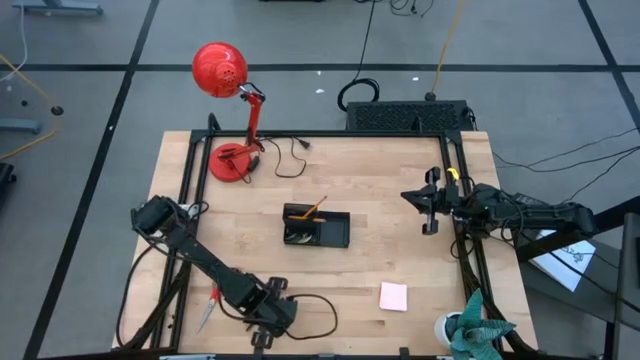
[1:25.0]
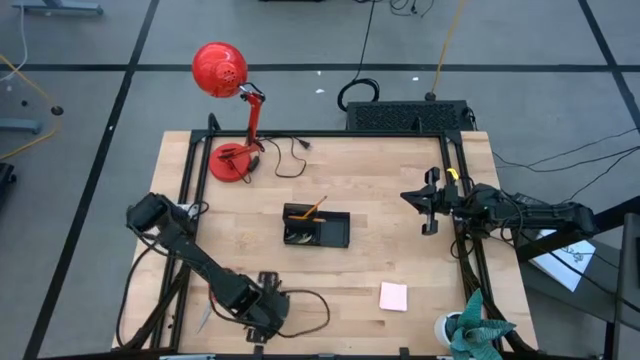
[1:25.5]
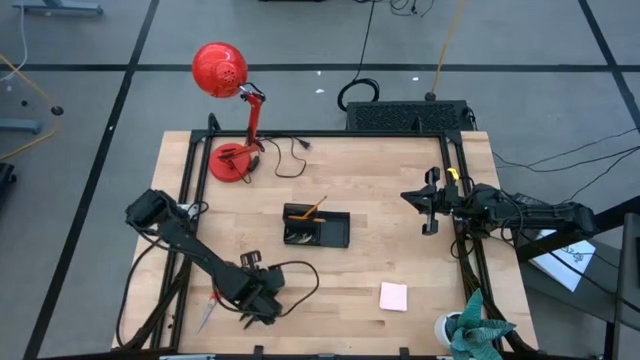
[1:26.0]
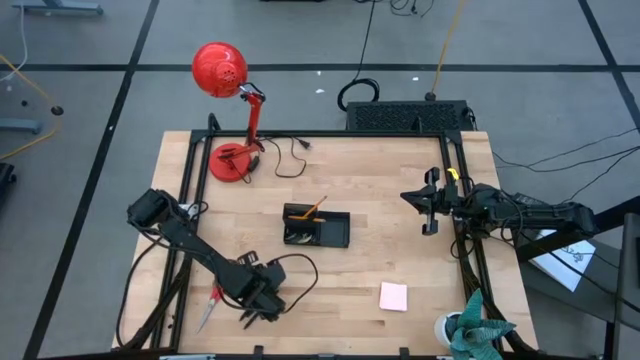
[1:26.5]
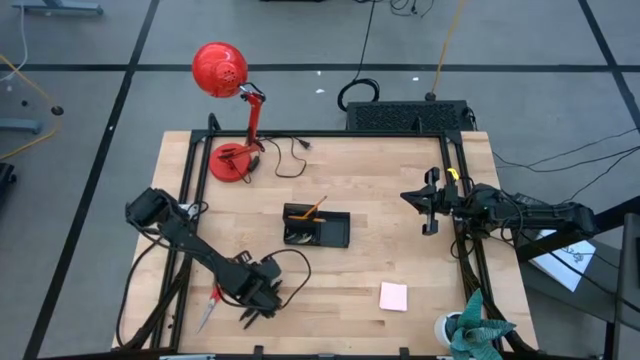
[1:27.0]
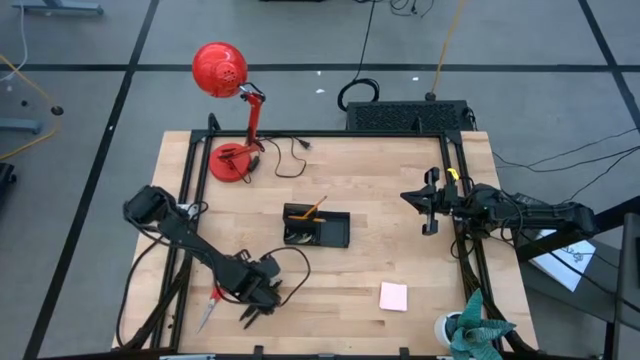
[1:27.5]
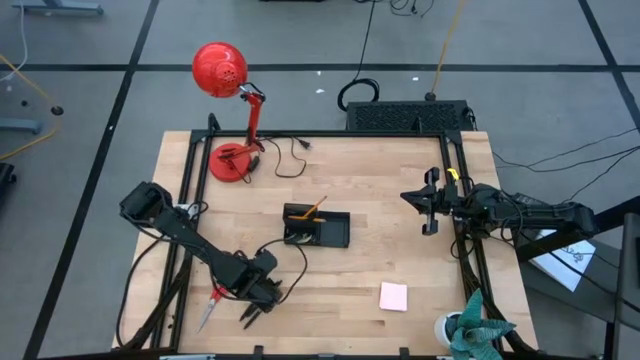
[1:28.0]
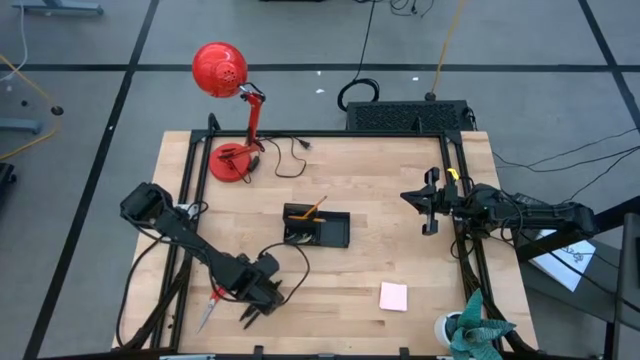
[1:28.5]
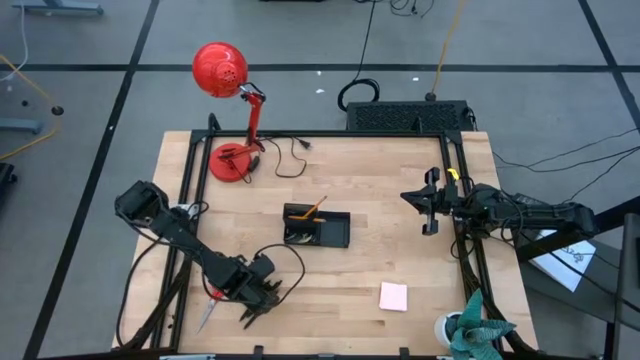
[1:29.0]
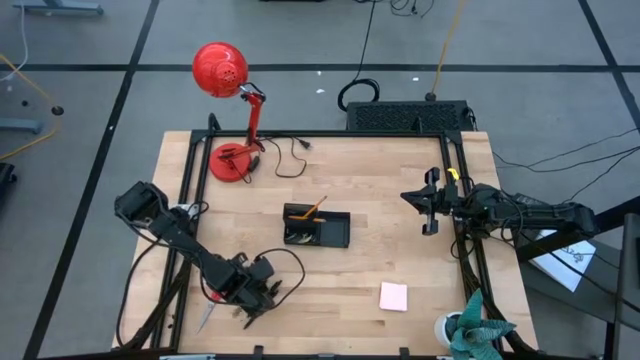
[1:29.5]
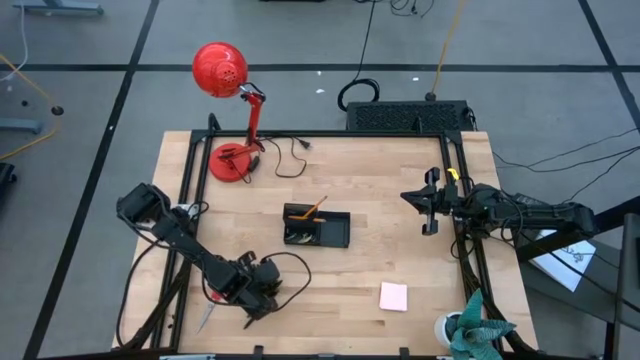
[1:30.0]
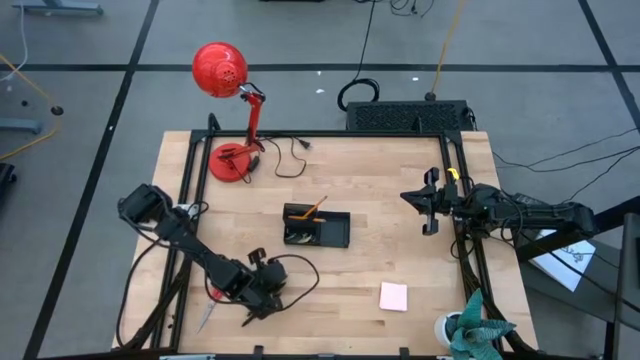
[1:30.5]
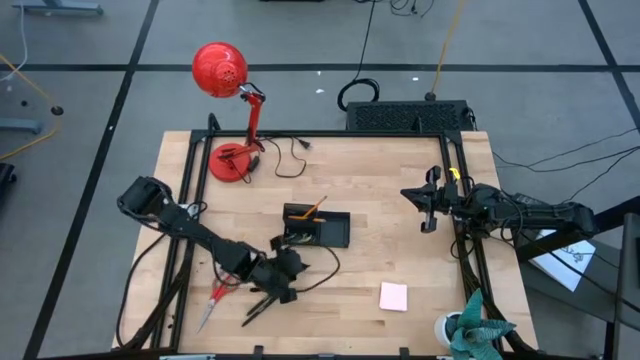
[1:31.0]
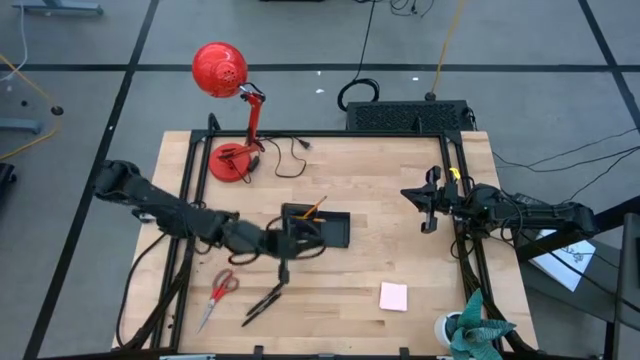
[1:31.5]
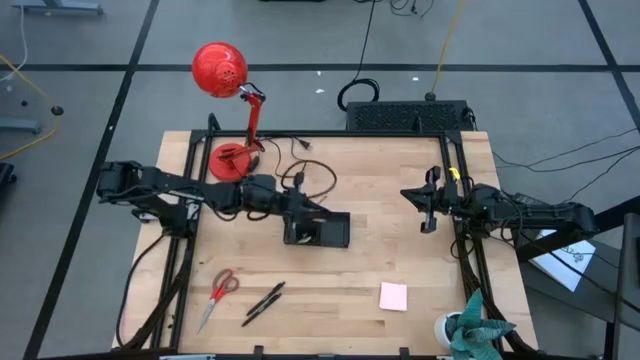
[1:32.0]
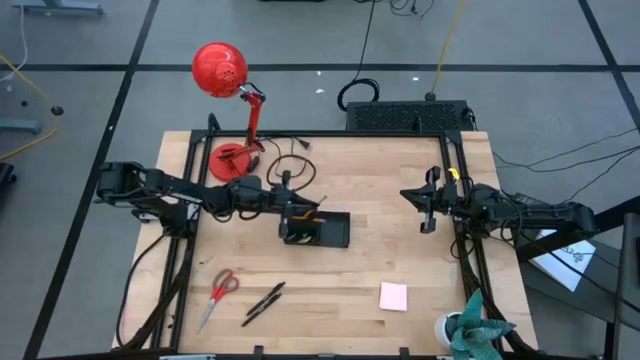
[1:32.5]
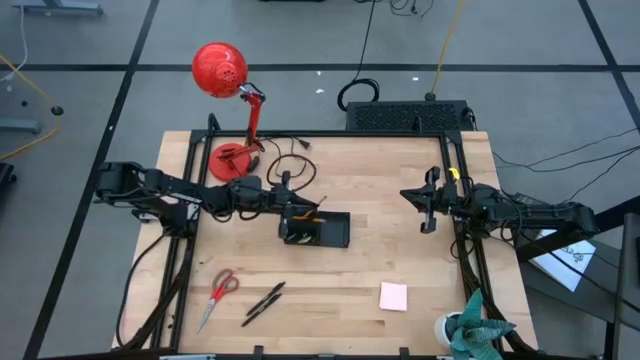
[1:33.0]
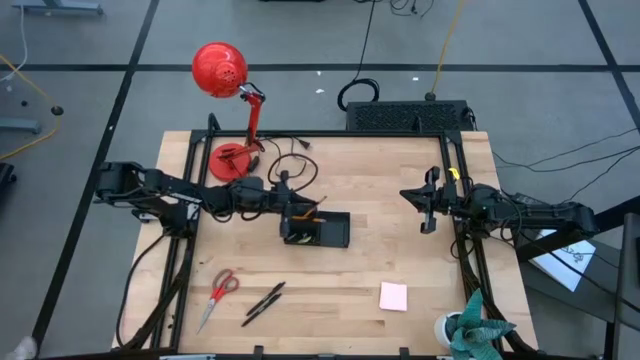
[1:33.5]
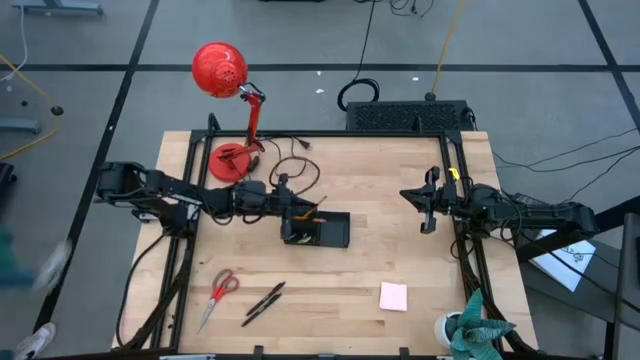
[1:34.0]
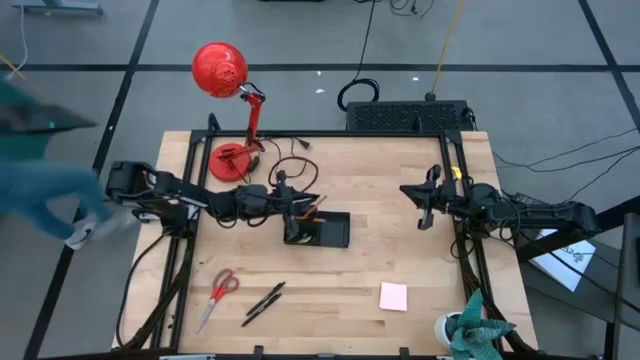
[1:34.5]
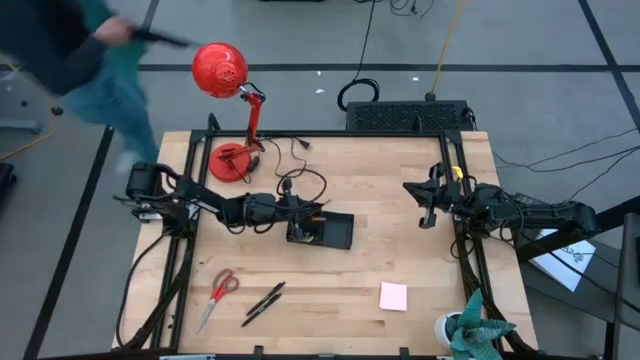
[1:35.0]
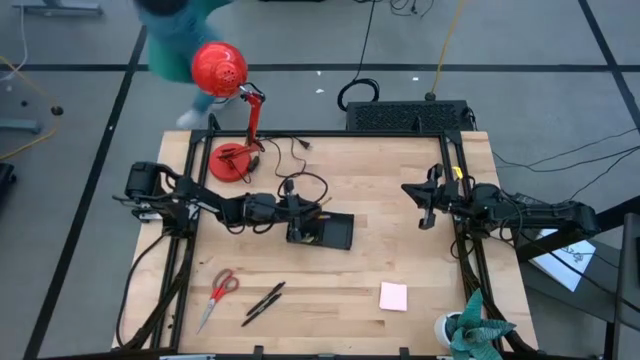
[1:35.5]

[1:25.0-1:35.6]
Task: Pick and place office supplies into organizer
Put the left pen into the top left section of the desk organizer

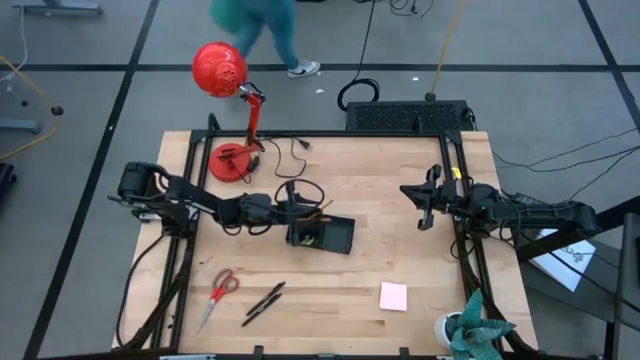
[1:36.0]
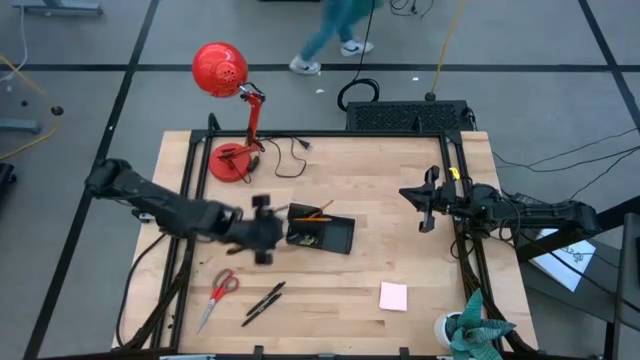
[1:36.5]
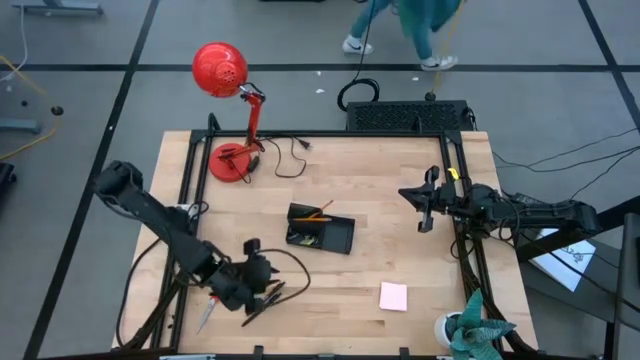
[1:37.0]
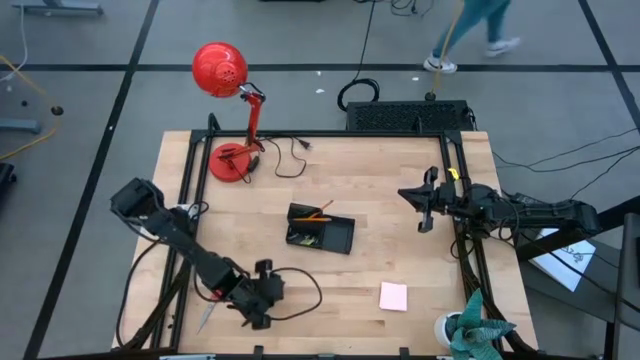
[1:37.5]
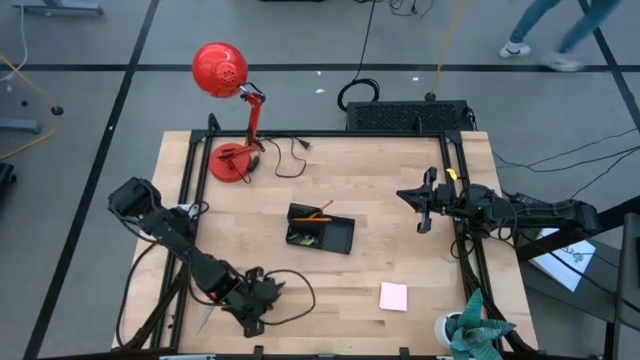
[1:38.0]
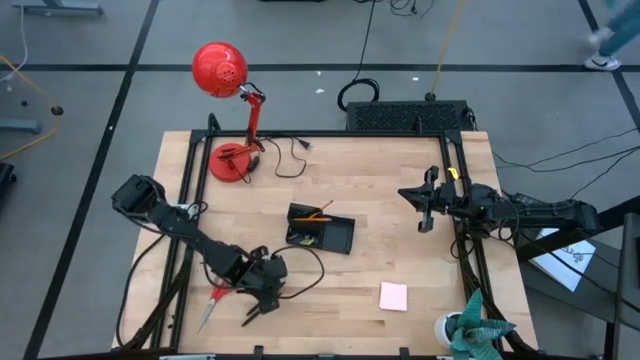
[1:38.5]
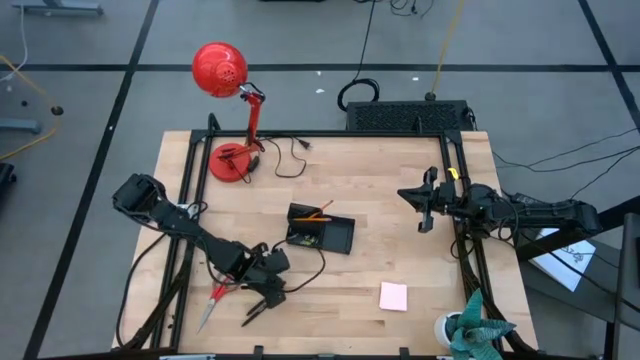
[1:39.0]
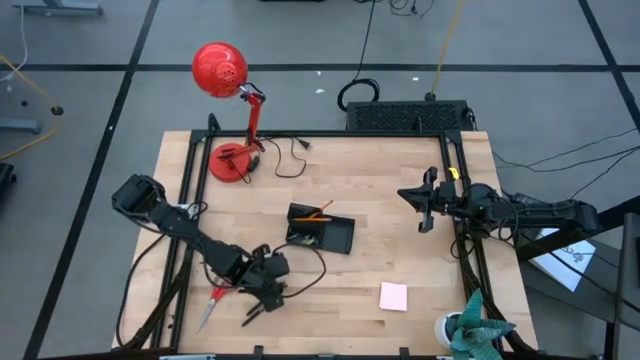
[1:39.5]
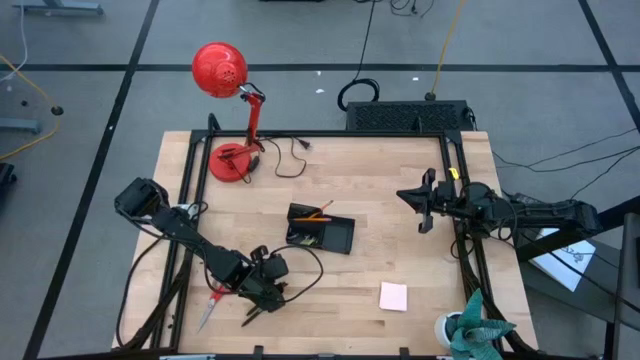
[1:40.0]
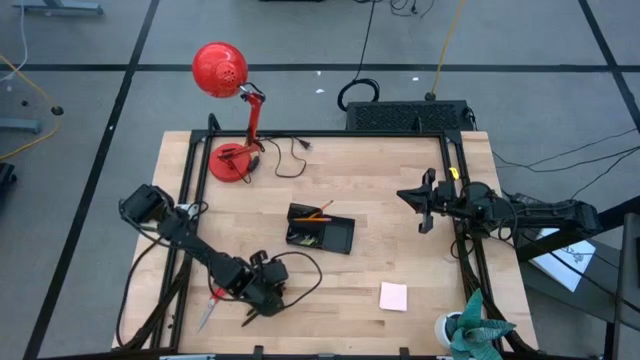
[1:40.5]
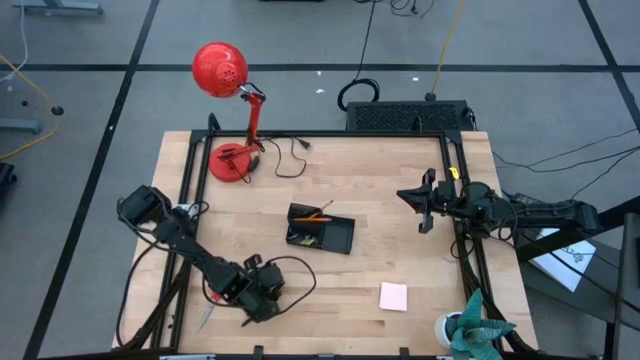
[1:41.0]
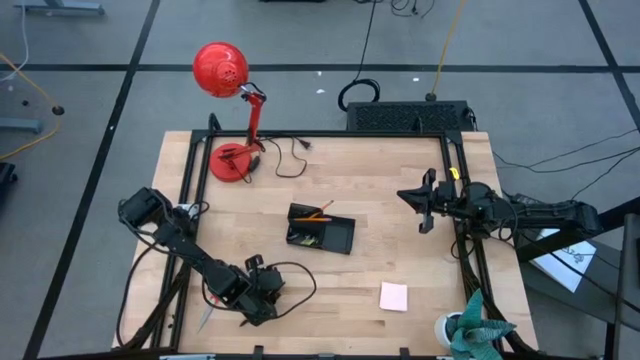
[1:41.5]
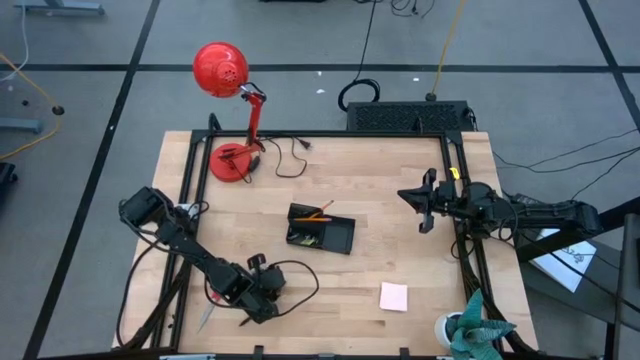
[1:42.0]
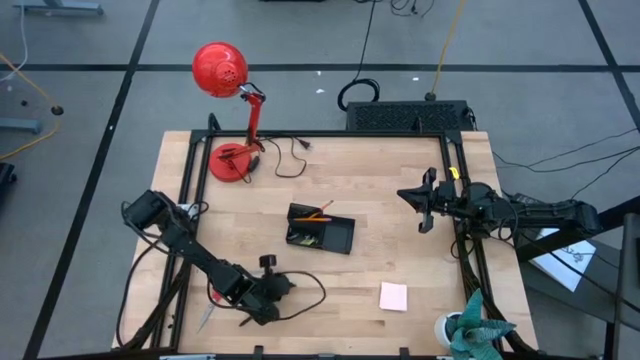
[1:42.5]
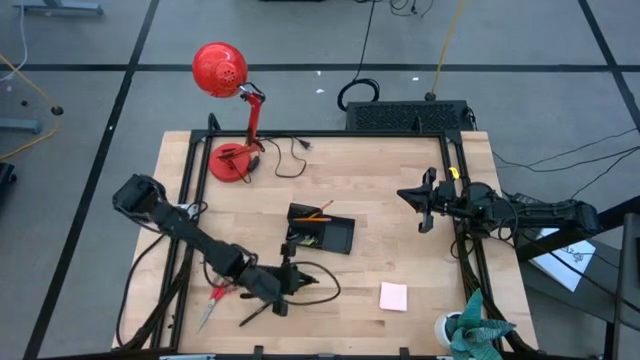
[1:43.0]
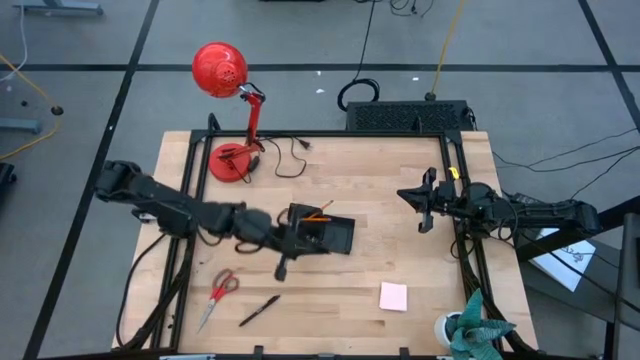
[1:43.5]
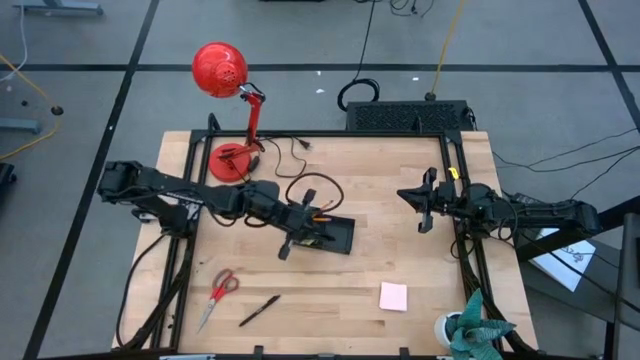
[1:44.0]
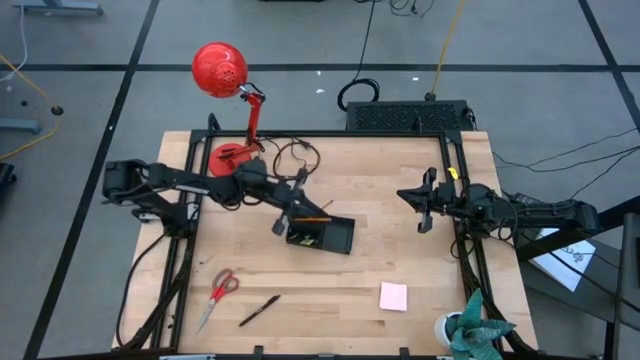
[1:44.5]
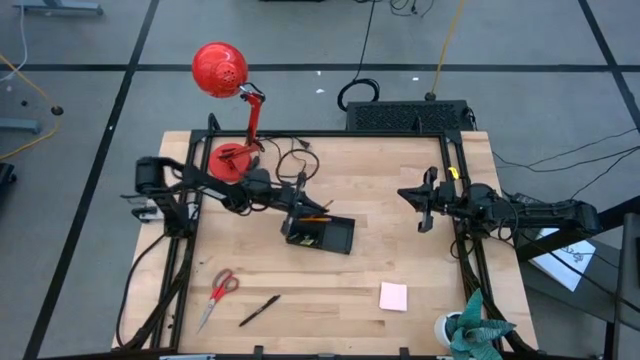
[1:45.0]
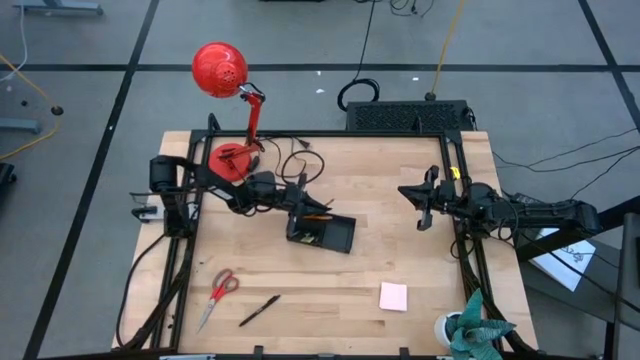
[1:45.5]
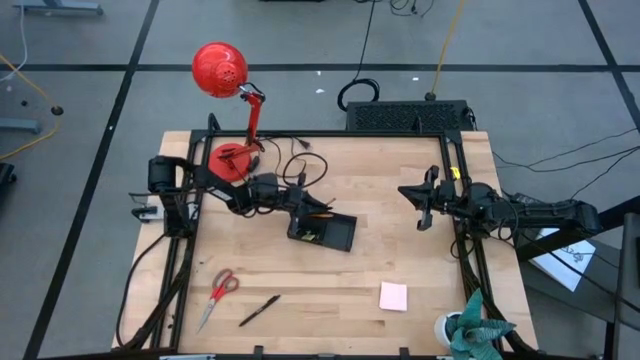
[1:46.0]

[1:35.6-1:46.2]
Put the left pen into the top left section of the desk organizer

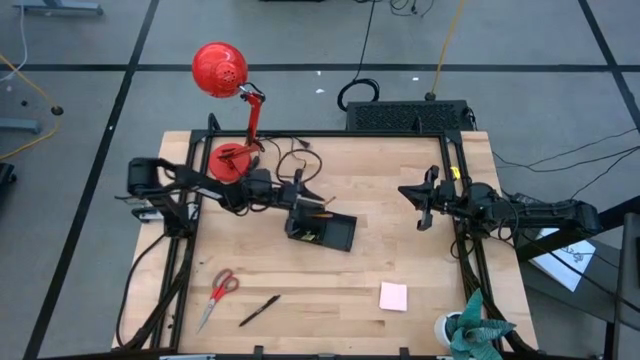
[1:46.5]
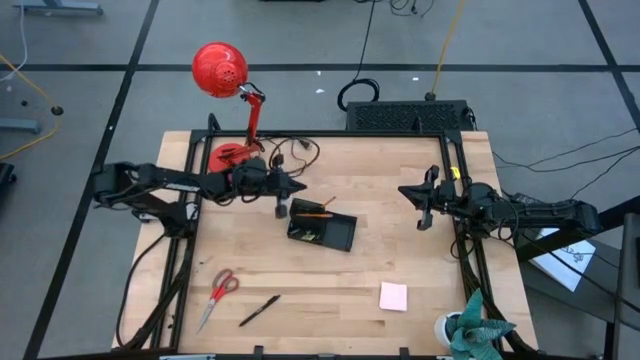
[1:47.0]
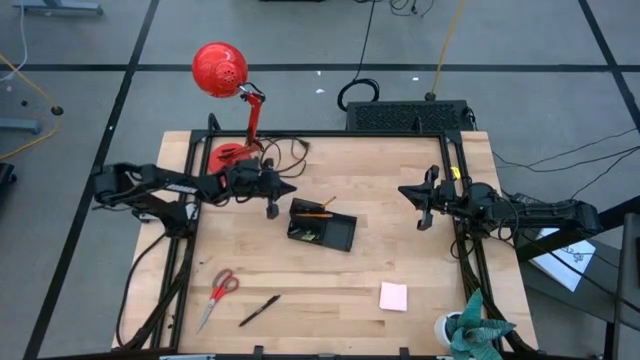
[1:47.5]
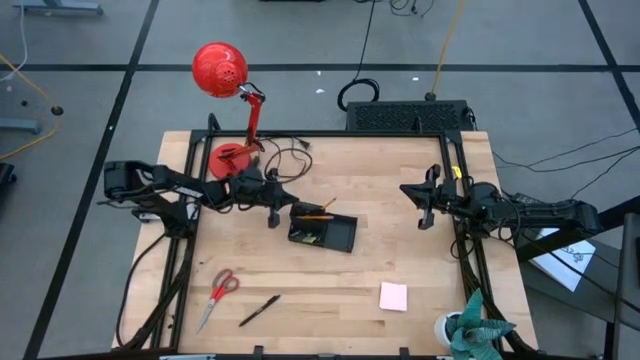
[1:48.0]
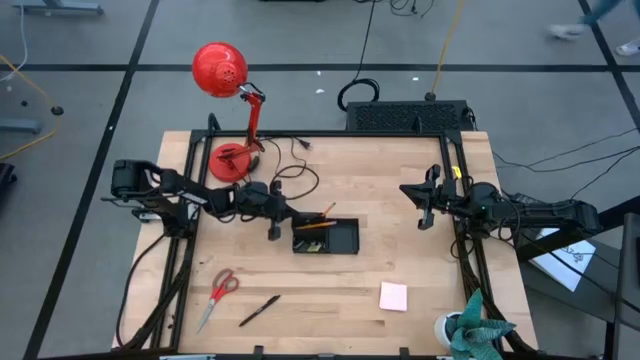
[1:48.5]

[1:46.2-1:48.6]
Adjust the black desk organizer
